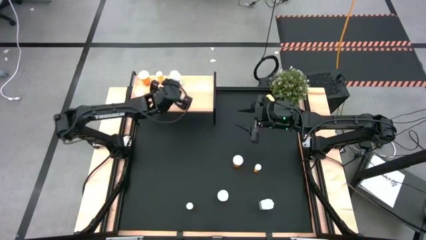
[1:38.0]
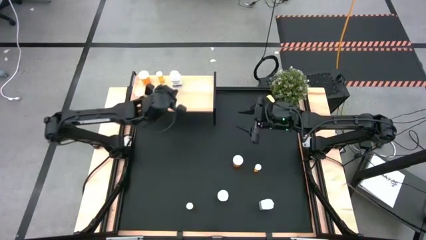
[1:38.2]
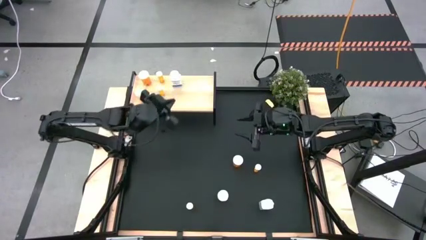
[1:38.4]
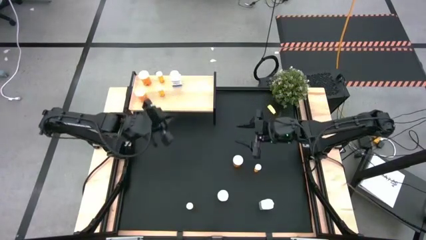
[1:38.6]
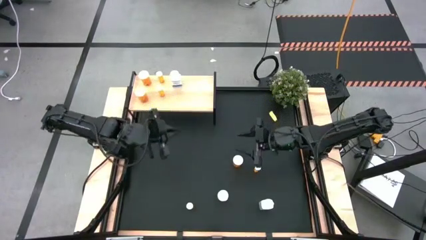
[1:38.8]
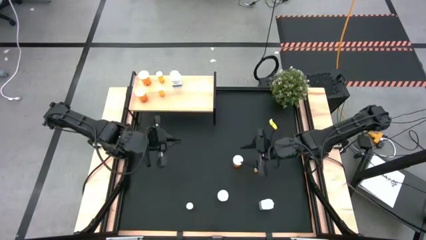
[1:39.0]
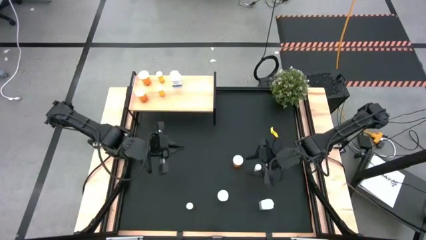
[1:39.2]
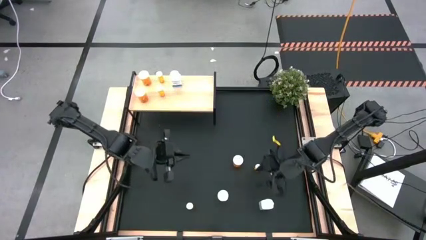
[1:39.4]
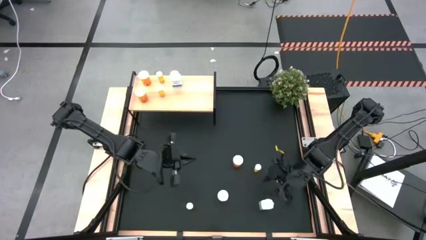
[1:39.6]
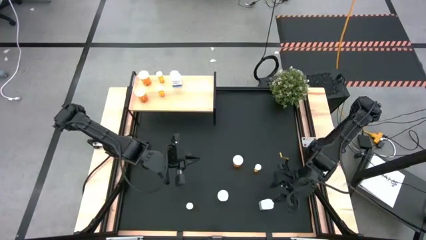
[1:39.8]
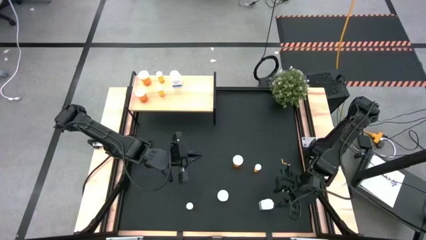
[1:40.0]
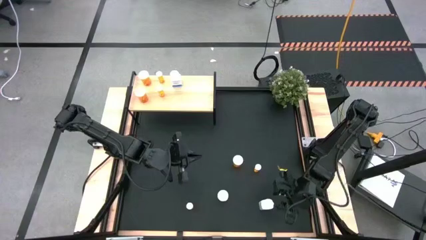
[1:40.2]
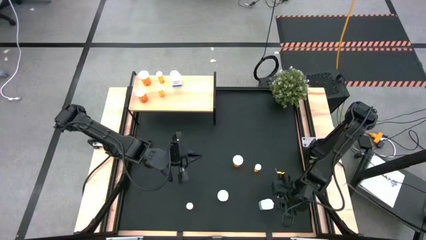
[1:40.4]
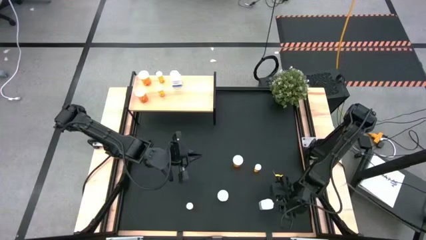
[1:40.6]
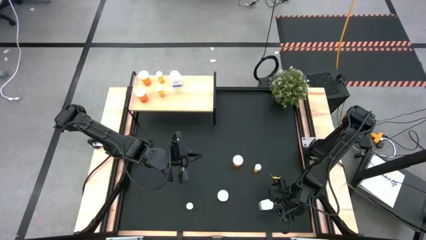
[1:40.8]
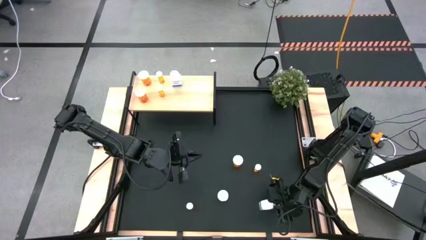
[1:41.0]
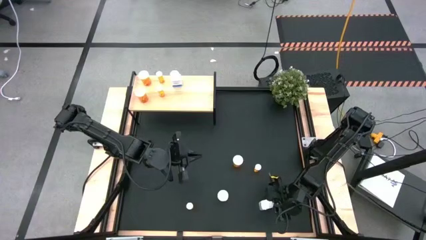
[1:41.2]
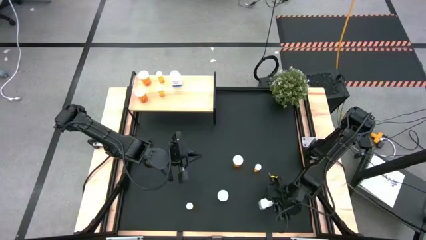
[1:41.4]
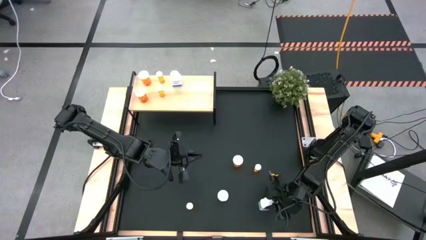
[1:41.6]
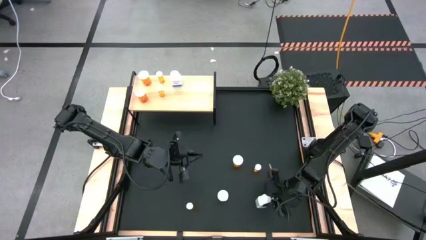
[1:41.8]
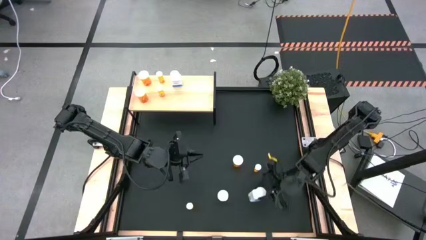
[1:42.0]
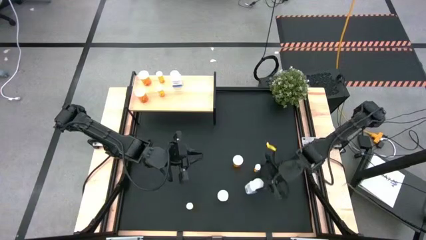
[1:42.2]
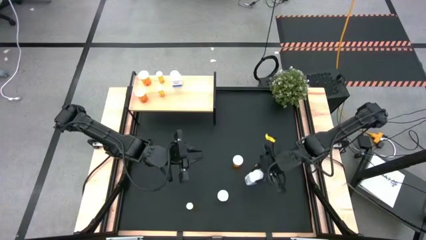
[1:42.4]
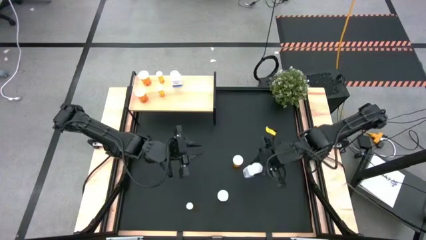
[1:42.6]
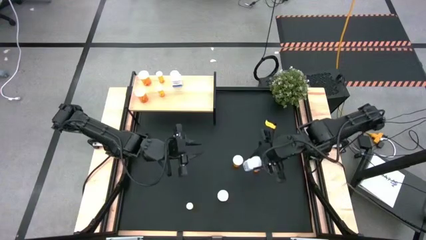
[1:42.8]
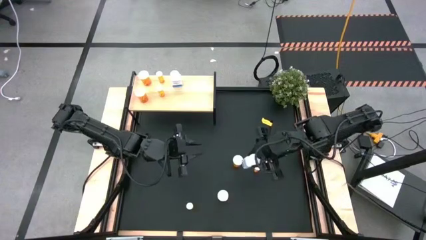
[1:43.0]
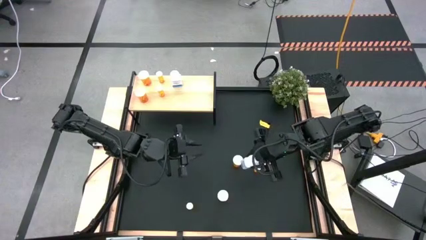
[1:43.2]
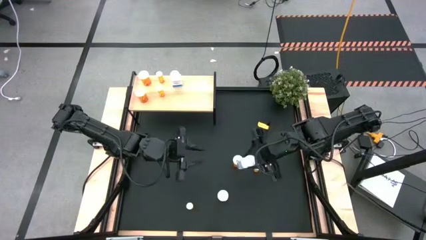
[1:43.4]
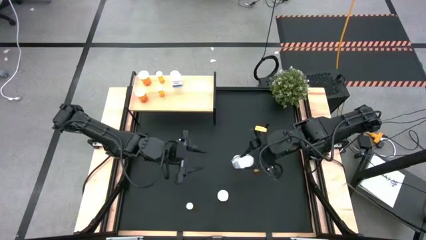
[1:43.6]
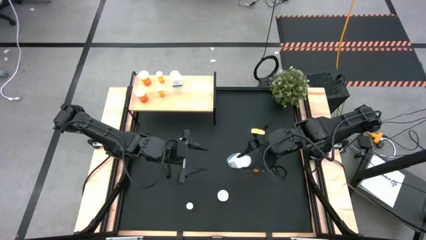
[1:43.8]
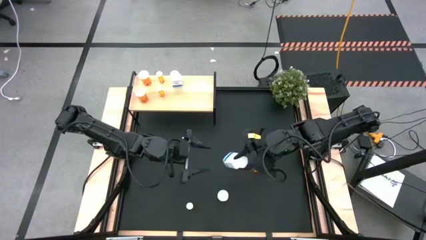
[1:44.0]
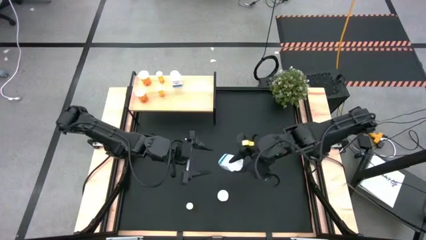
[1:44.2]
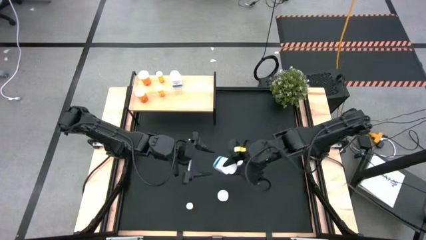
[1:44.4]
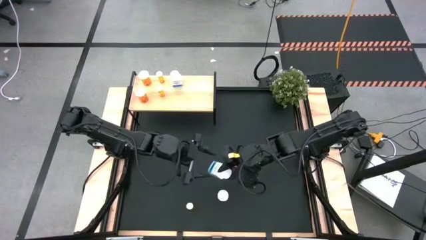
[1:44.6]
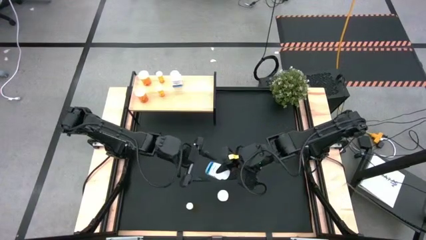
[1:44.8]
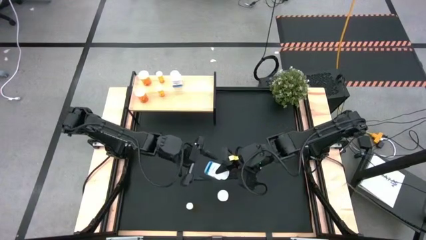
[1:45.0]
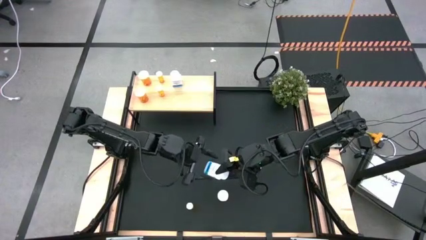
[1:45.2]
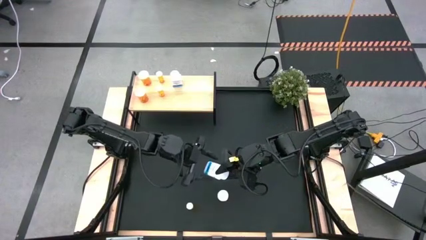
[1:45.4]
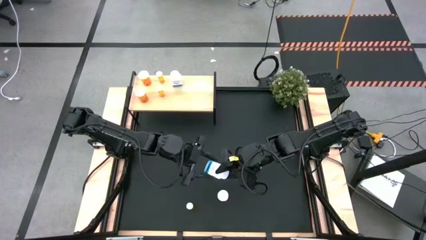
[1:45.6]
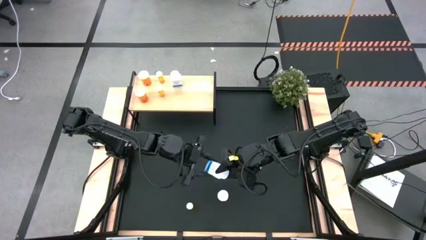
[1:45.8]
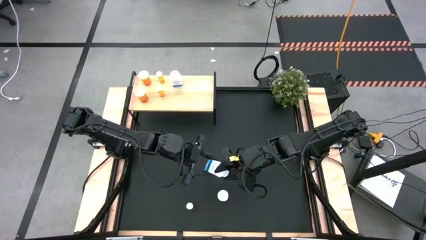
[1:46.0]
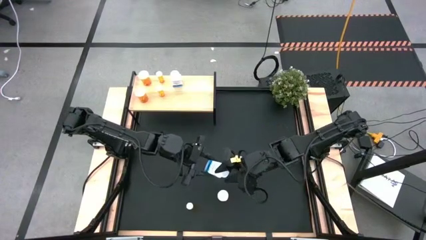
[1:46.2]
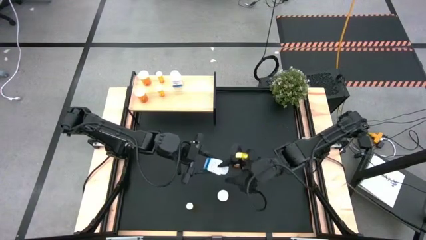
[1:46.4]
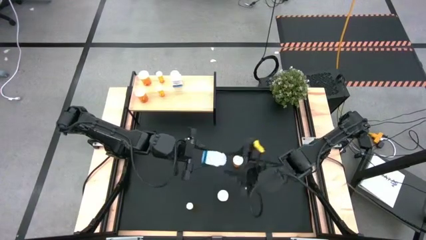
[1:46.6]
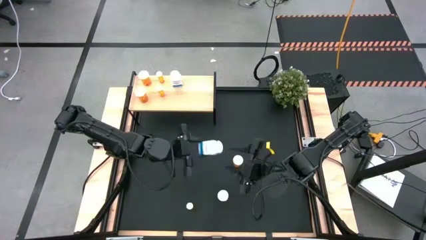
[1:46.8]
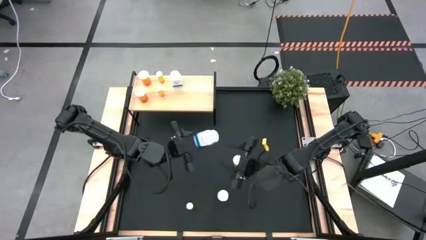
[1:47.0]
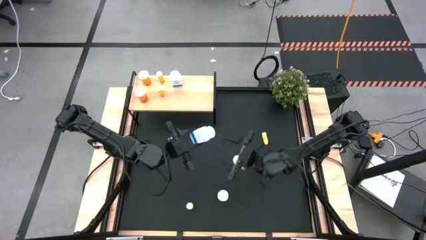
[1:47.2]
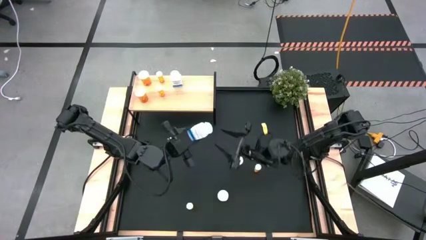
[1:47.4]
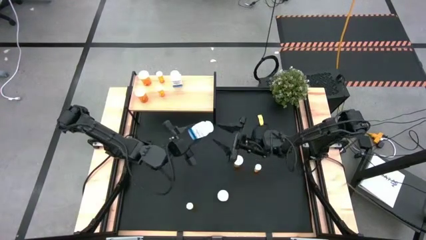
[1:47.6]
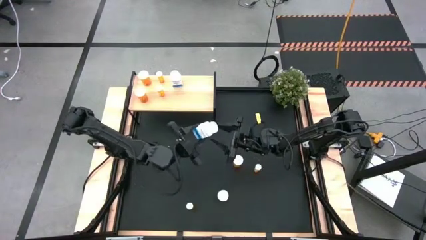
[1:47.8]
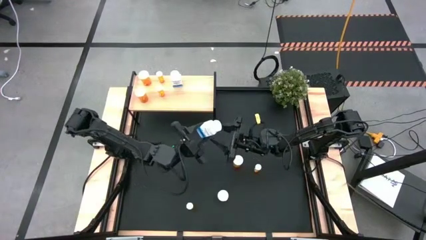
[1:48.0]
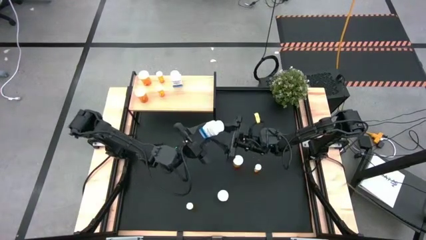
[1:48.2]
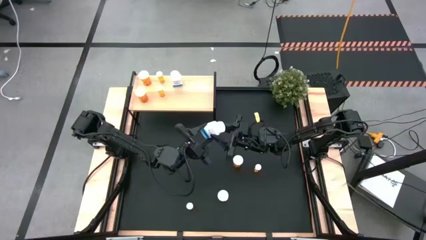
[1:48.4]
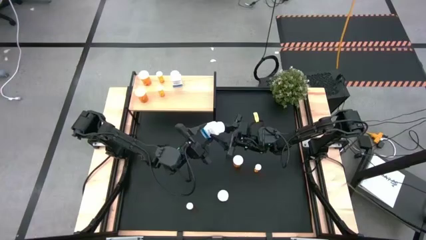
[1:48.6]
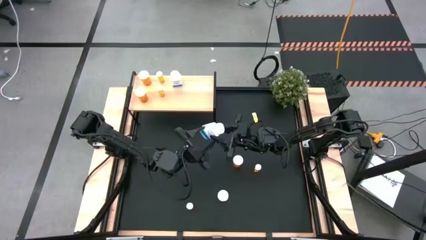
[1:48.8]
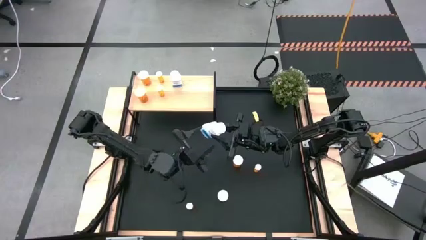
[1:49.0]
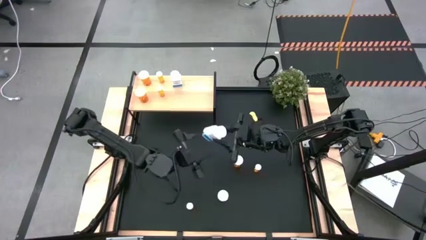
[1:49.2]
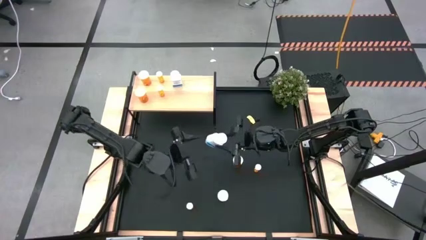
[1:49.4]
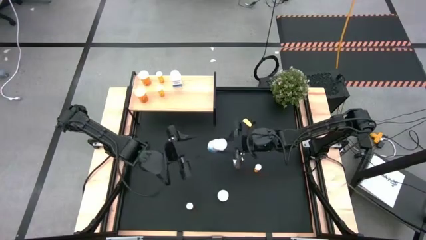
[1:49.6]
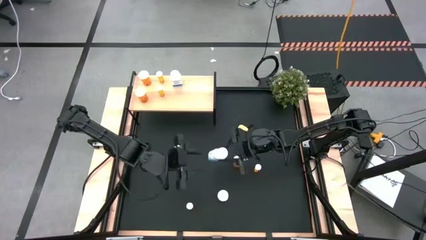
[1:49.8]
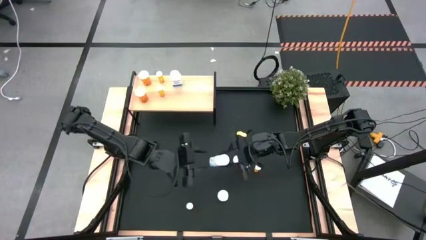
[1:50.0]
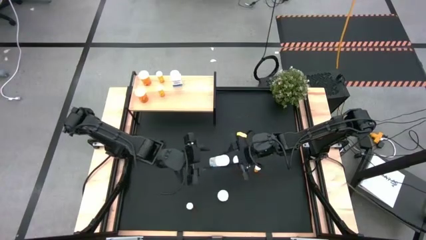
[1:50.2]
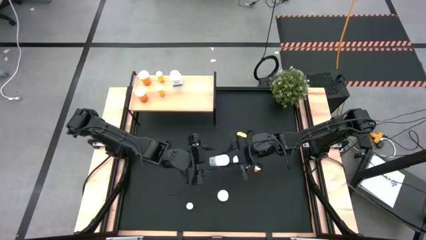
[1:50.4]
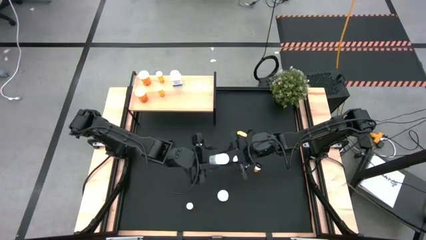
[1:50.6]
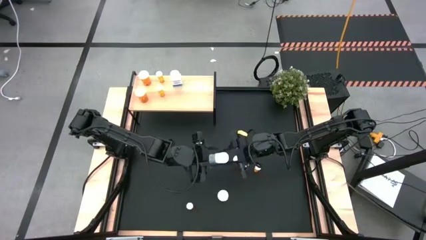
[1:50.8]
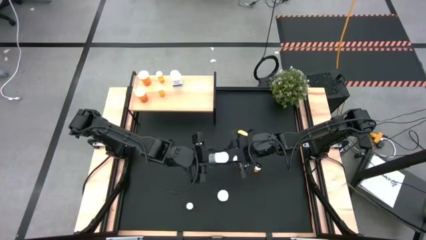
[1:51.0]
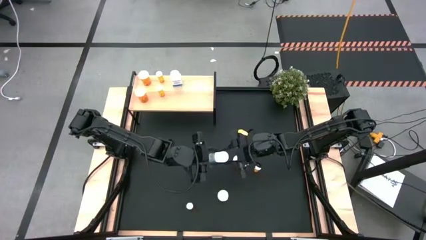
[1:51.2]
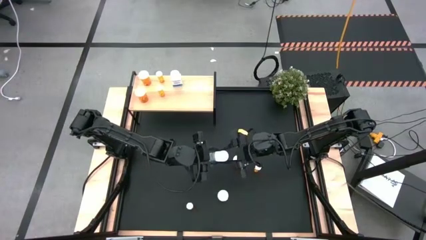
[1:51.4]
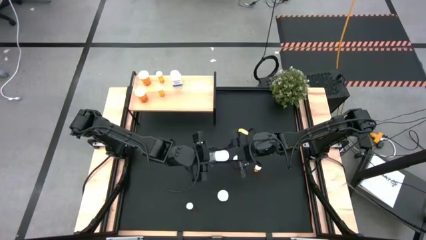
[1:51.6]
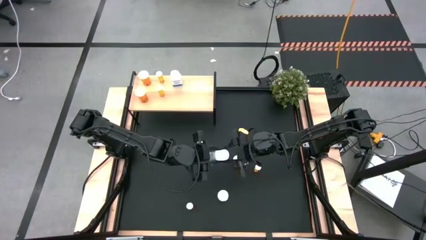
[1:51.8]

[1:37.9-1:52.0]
Task: Pick and place medicine bottles onto shelf by color
Put the white pill bottle on the shelf aligned with the other white pill bottle
